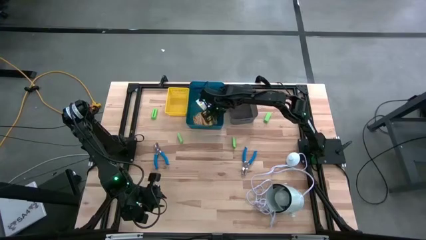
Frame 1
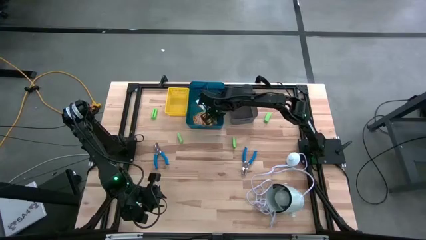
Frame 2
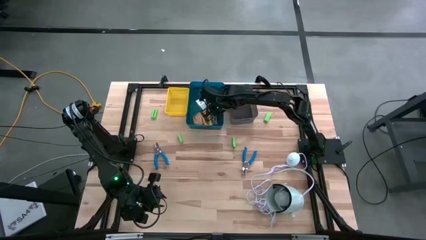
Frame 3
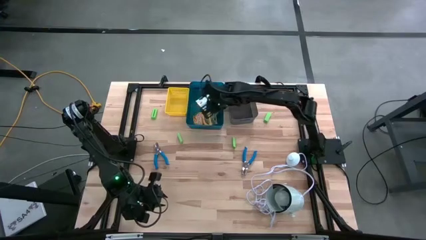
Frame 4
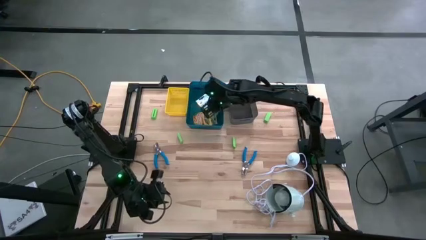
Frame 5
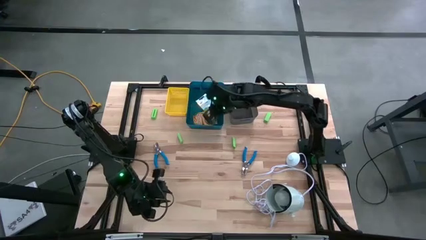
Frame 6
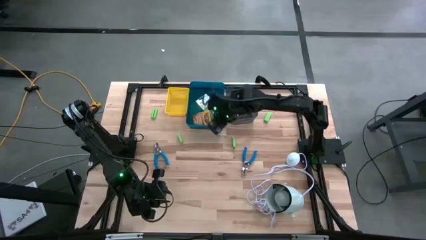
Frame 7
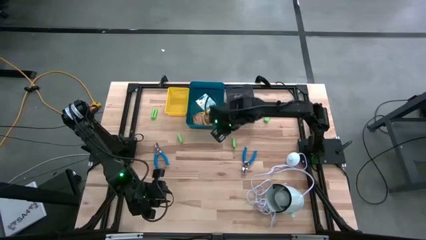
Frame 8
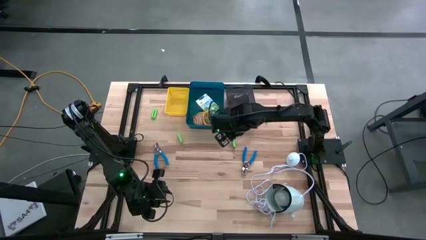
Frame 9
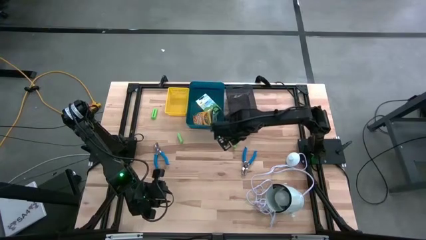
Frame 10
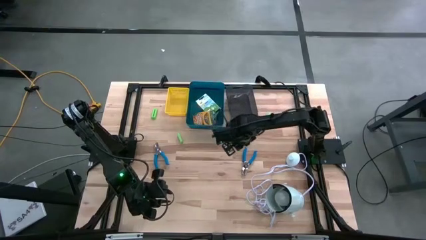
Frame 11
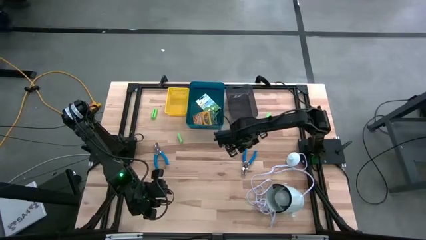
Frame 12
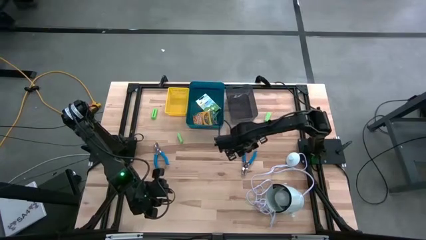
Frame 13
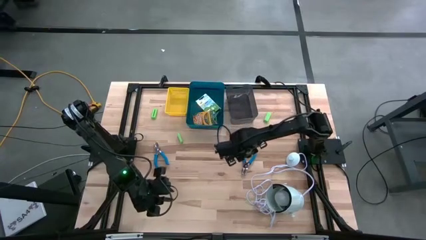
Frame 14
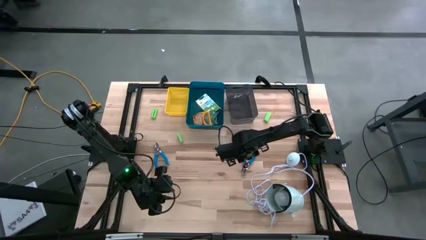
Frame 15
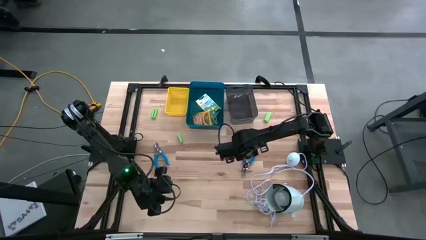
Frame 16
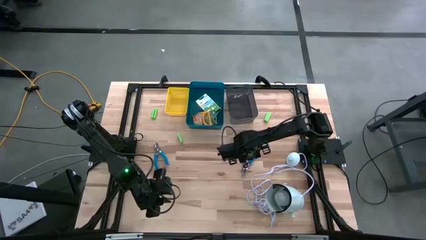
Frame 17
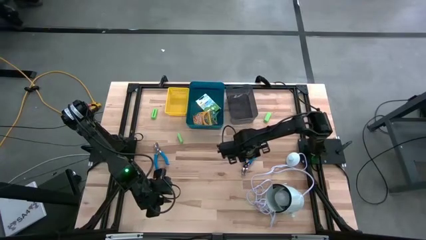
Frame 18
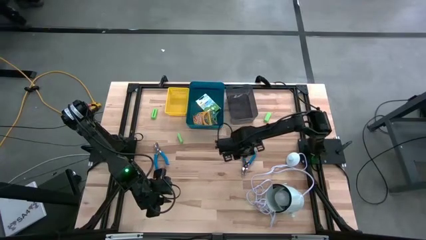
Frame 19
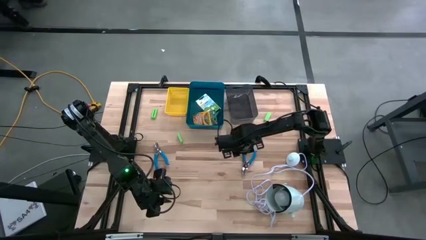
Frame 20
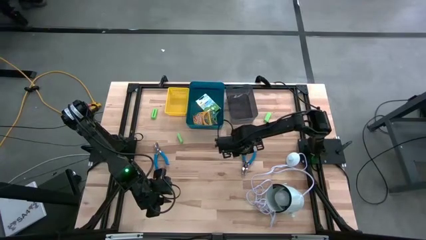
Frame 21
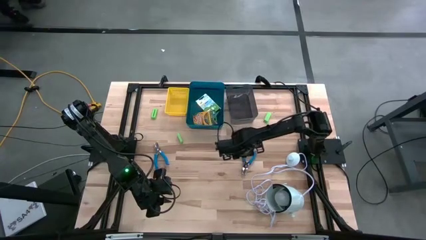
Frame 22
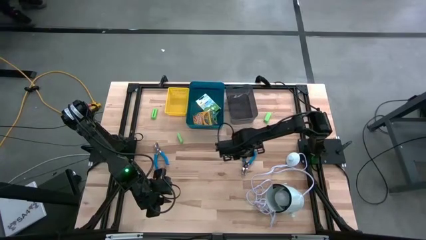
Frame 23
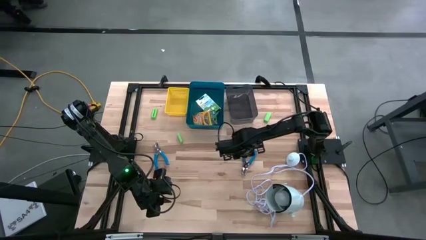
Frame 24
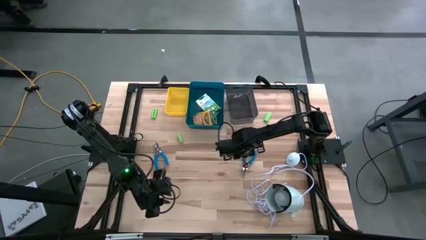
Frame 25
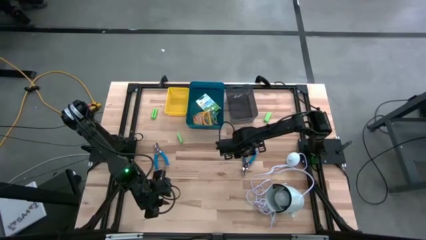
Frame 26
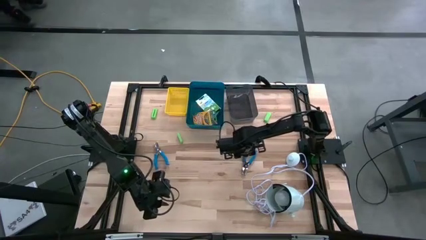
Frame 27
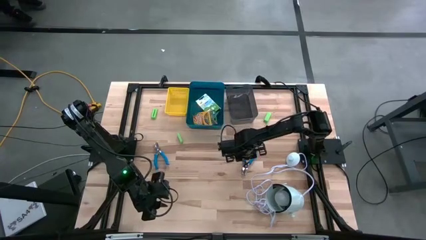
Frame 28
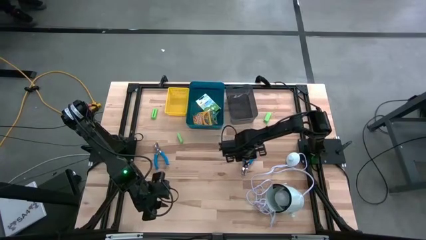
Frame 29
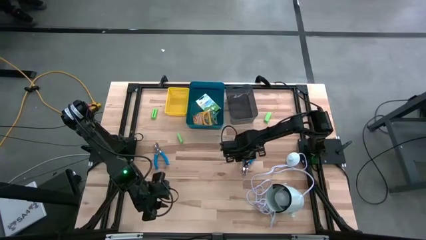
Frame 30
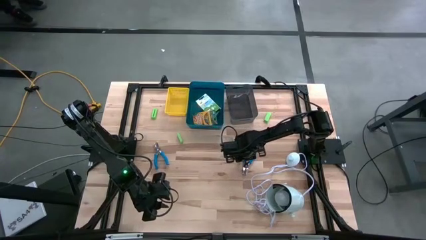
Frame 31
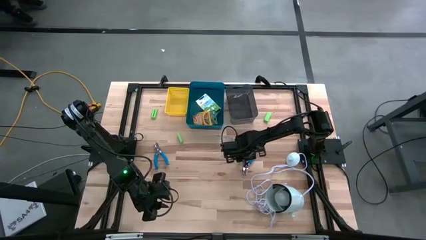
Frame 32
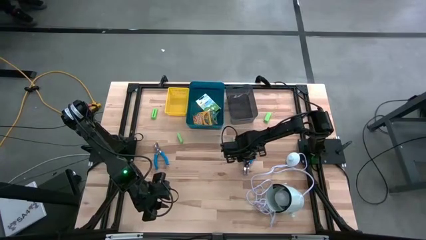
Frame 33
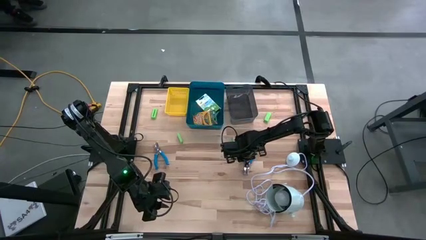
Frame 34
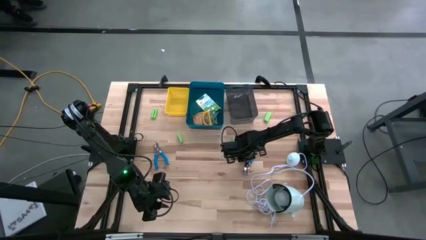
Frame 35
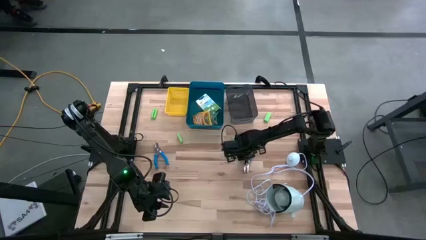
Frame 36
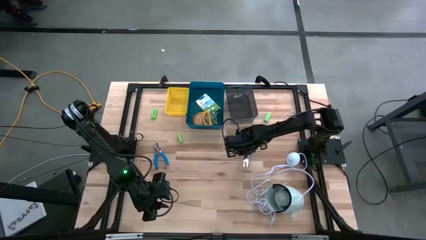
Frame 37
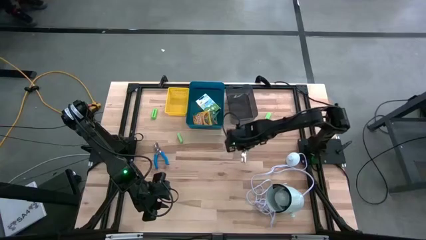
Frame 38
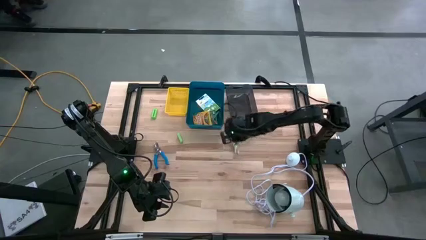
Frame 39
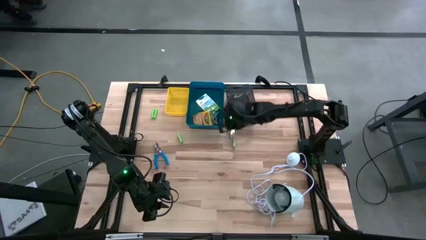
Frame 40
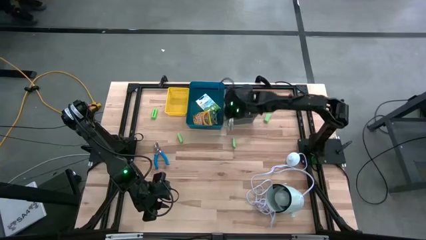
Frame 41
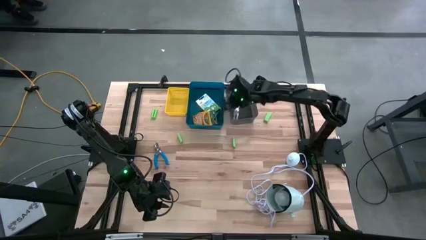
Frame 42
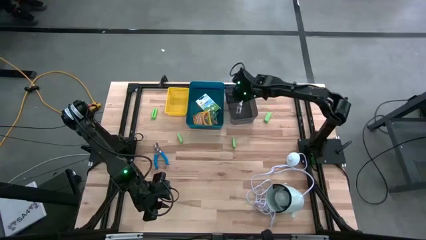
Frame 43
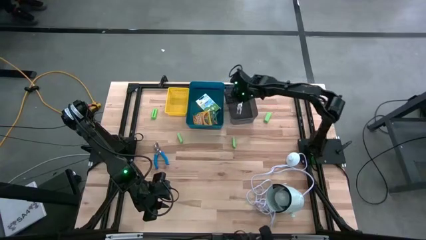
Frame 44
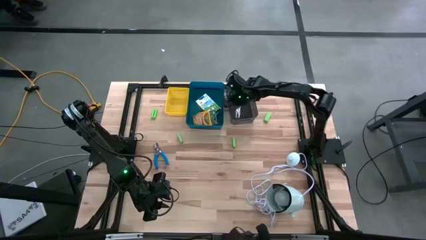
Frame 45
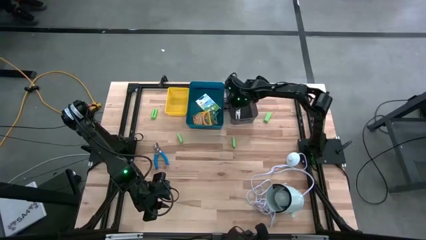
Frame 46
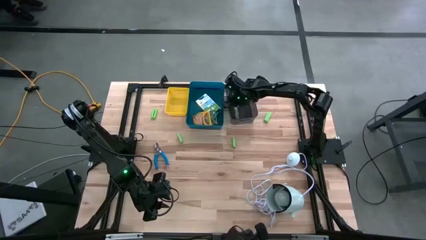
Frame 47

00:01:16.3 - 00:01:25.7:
Task: Pick & Place School Supplies
Put the blue puncher into the black bin

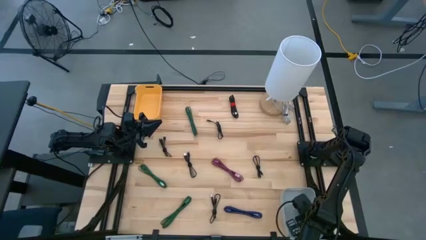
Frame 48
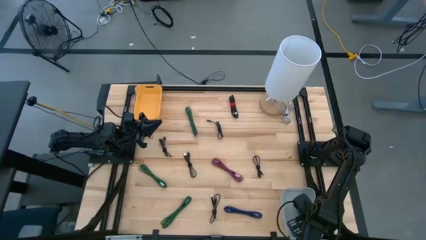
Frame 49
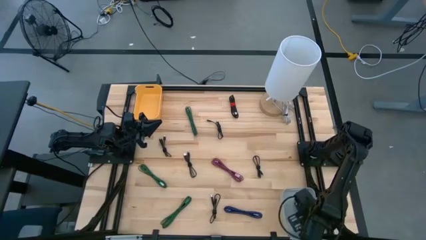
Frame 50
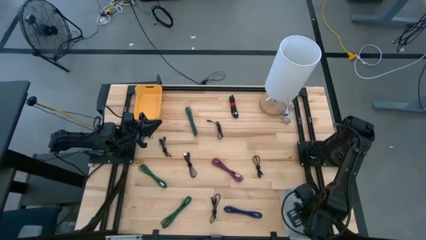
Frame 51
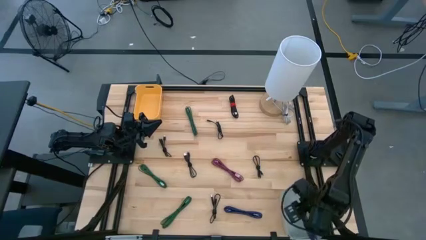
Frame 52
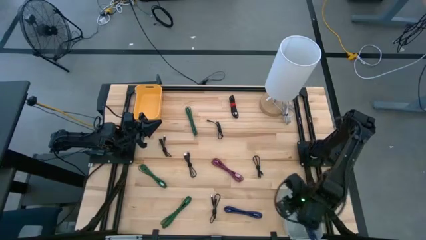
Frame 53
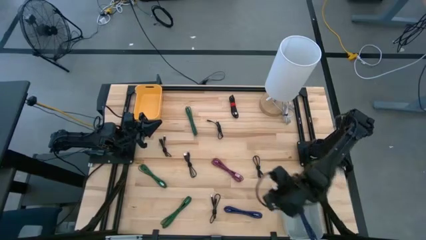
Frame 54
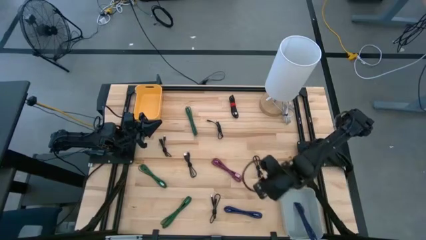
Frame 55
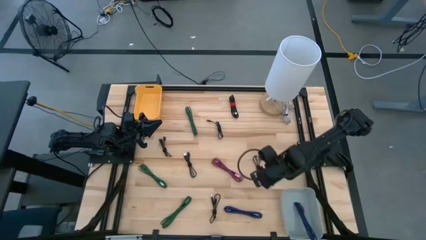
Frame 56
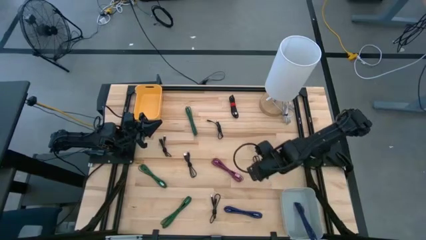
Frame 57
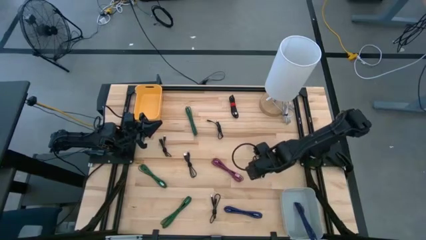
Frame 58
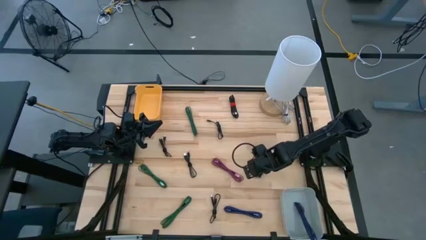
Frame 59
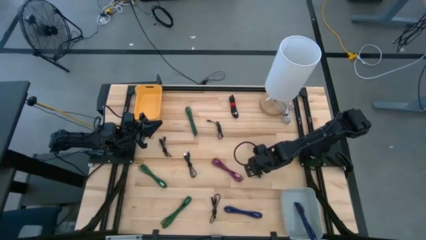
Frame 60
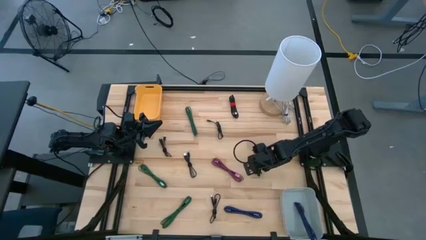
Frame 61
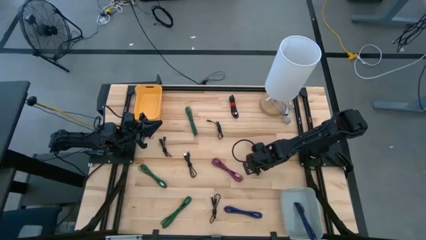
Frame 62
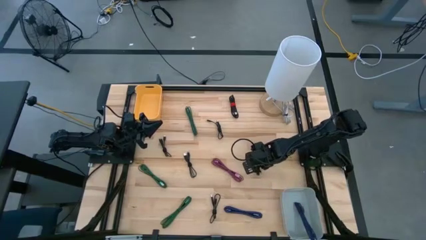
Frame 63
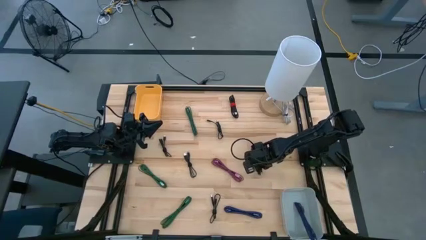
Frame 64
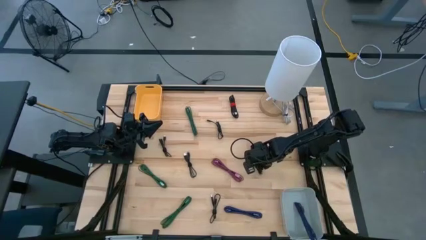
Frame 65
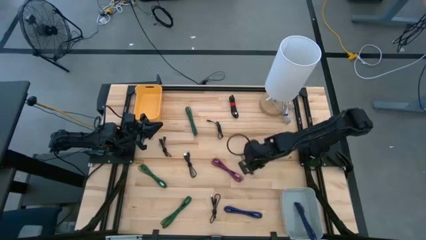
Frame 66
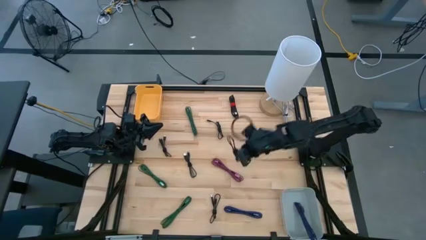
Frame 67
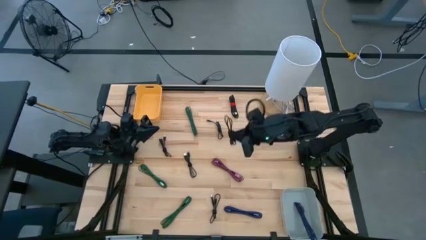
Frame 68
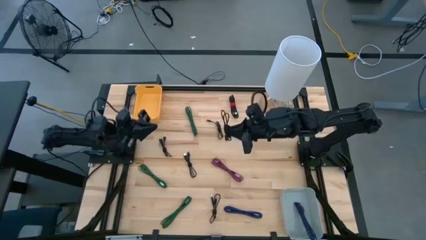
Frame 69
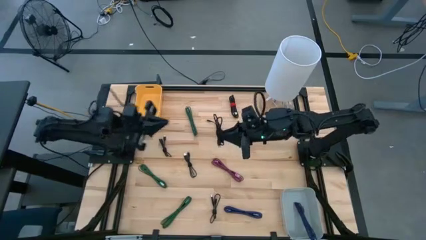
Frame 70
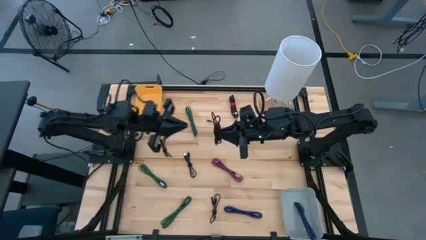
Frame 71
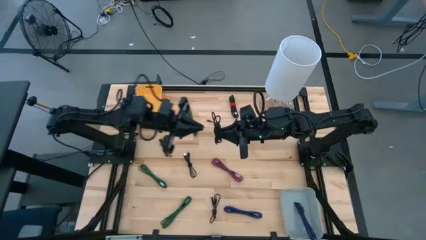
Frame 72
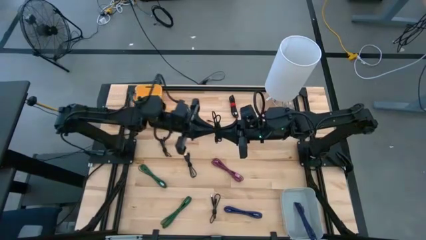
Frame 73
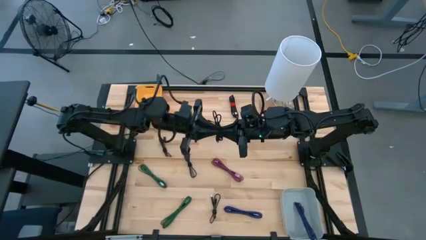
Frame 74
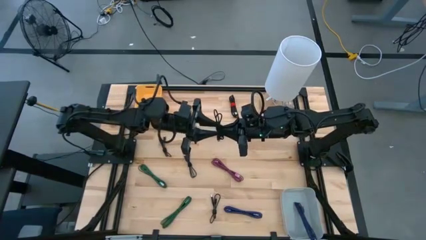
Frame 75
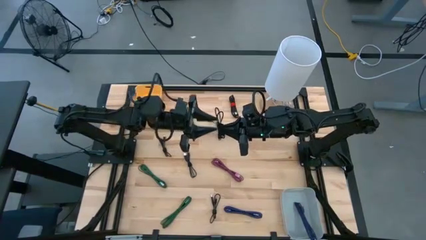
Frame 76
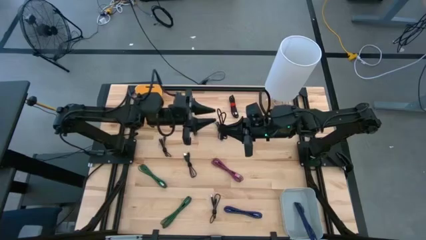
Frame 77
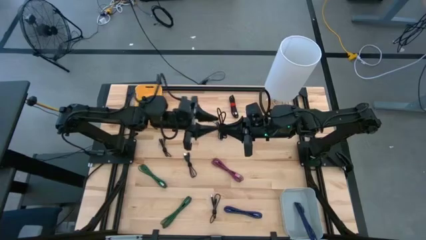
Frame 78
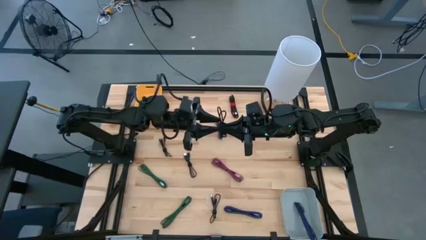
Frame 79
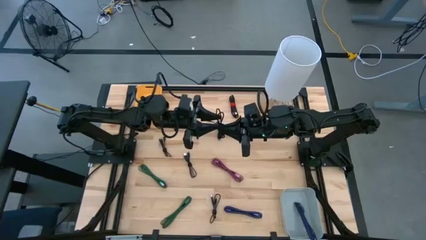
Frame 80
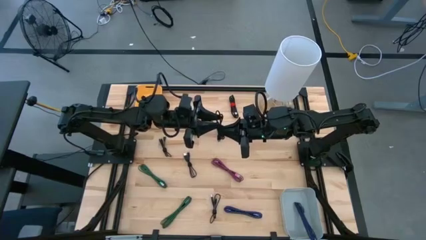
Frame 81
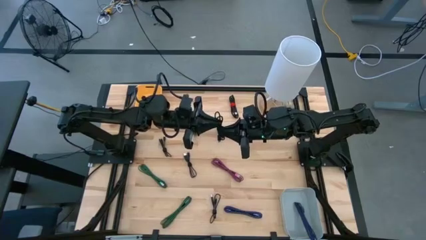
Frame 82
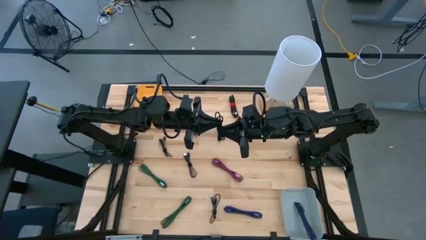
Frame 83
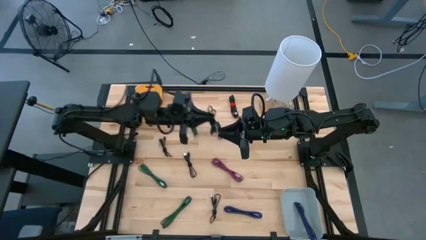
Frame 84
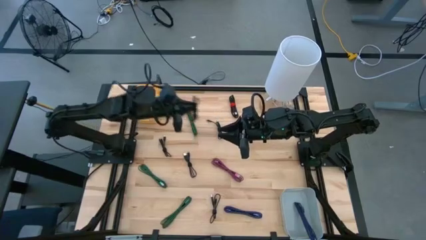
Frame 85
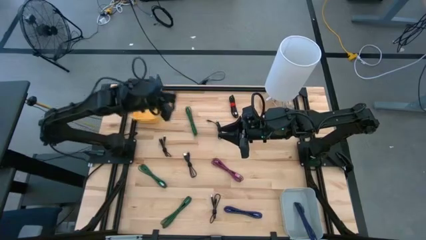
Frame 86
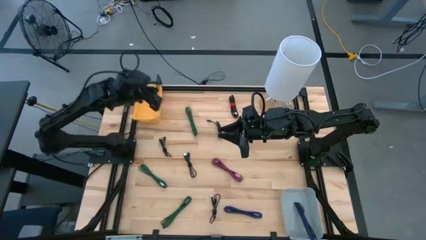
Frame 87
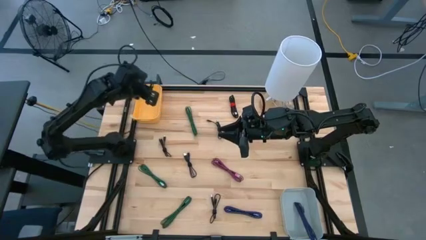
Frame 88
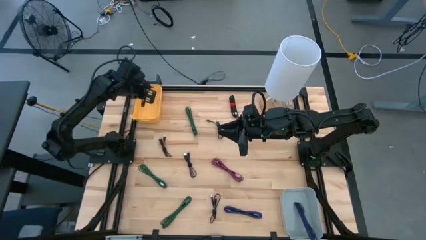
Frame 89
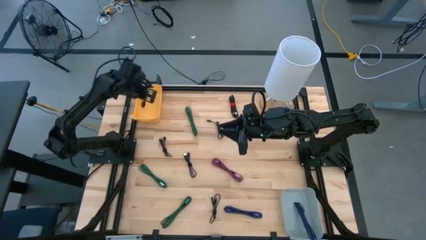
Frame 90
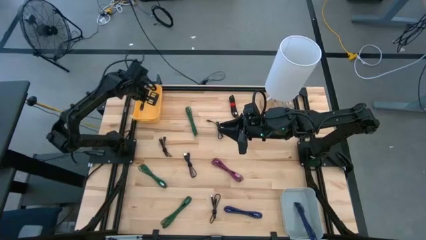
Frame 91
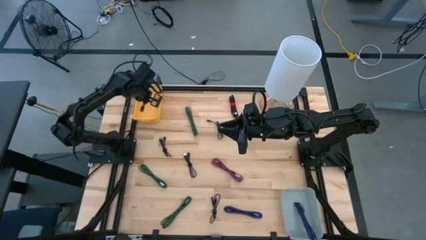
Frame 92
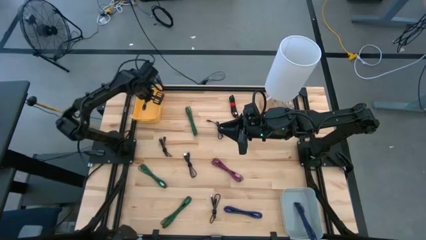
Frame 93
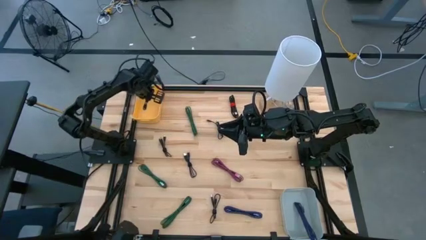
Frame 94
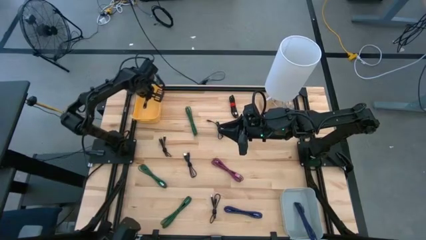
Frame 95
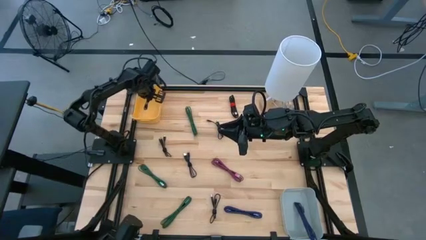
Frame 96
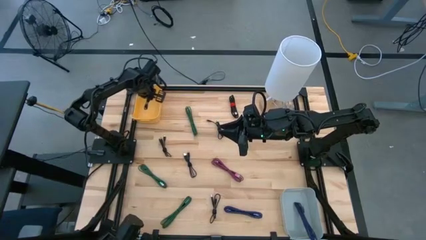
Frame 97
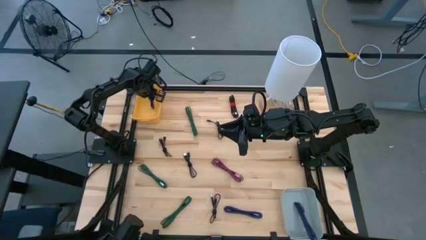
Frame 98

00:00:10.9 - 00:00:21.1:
Task: Pick & Place USB Port
Put the black charger cable into the yellow bin
